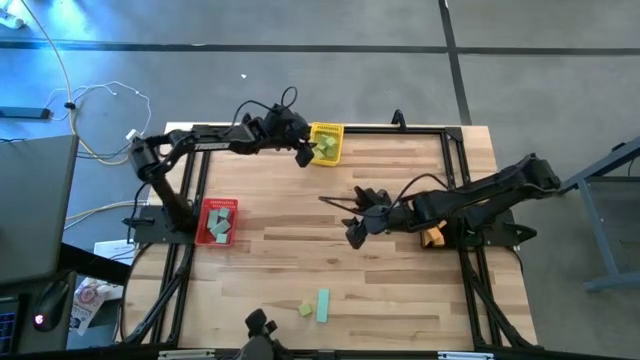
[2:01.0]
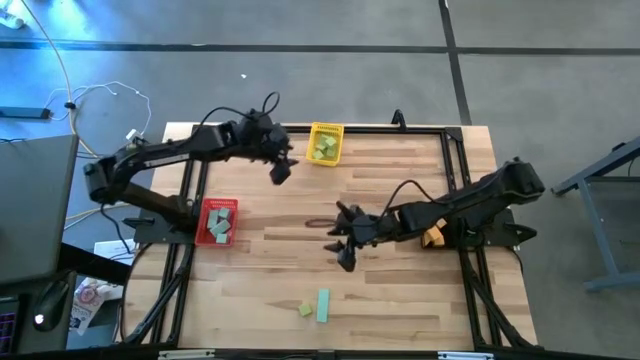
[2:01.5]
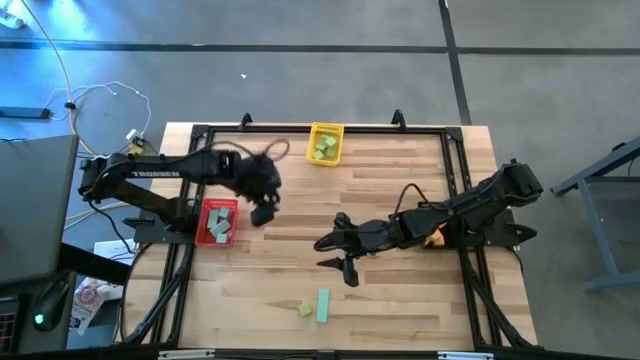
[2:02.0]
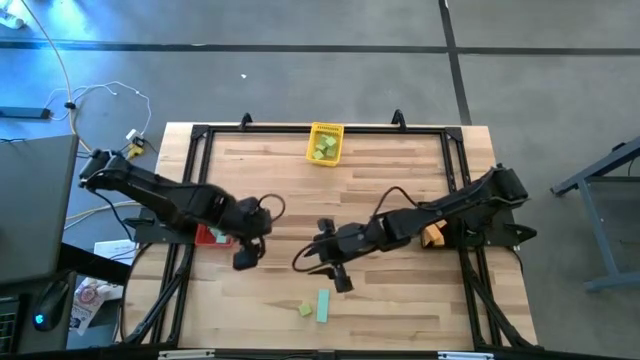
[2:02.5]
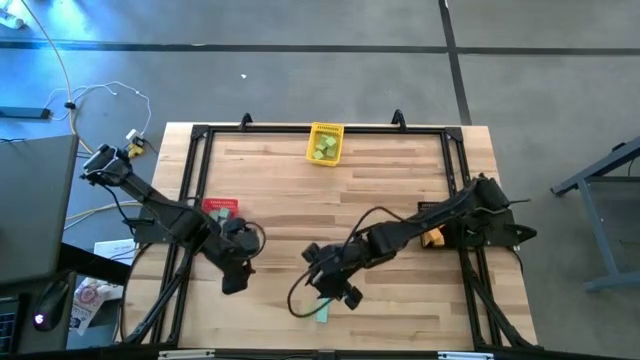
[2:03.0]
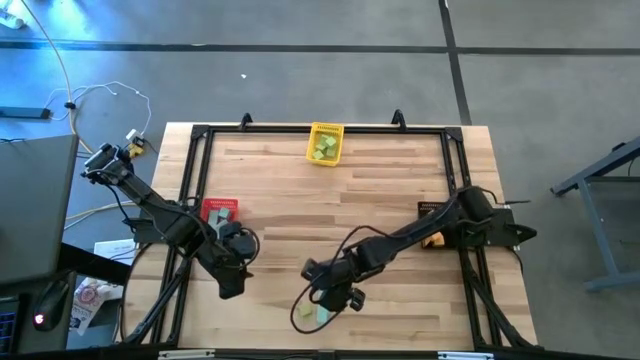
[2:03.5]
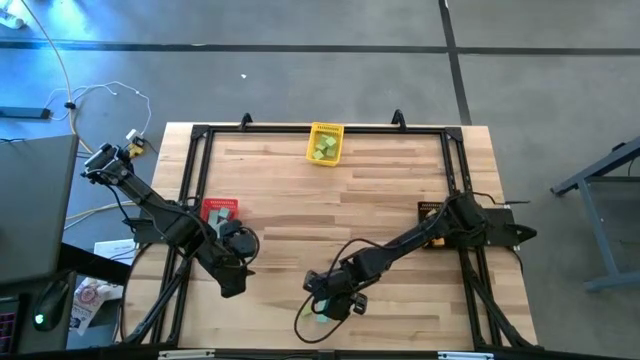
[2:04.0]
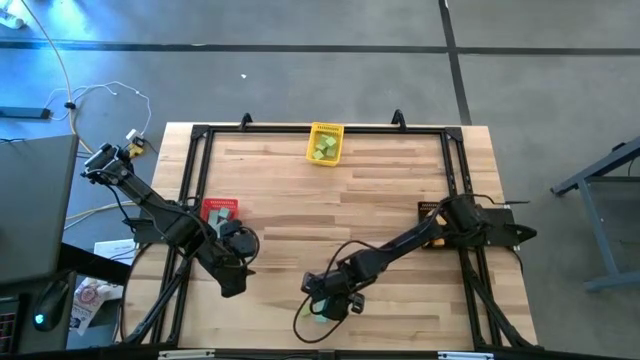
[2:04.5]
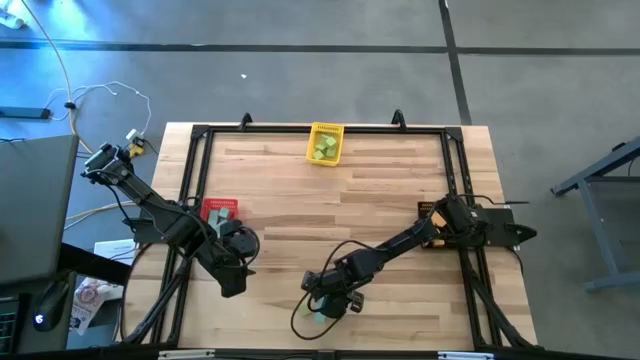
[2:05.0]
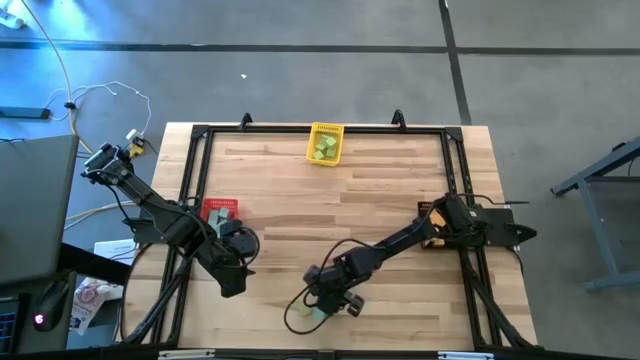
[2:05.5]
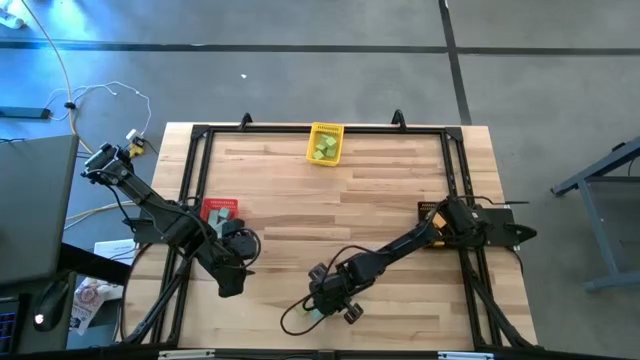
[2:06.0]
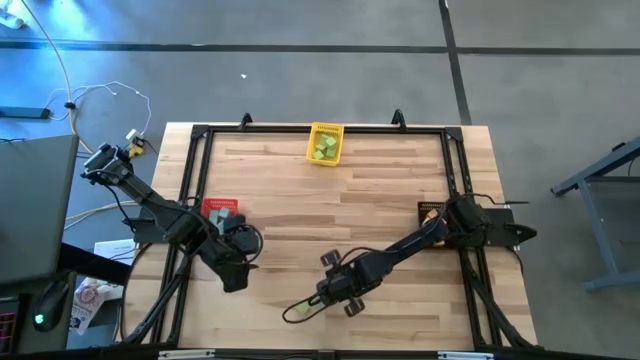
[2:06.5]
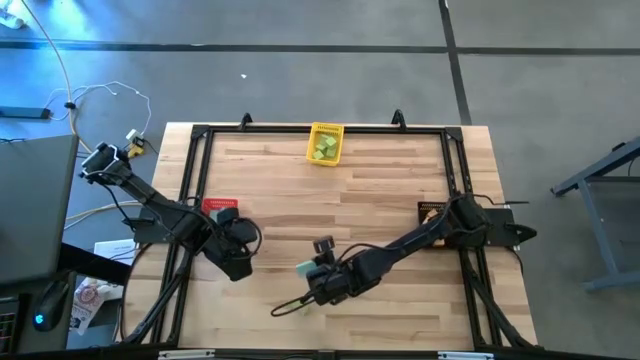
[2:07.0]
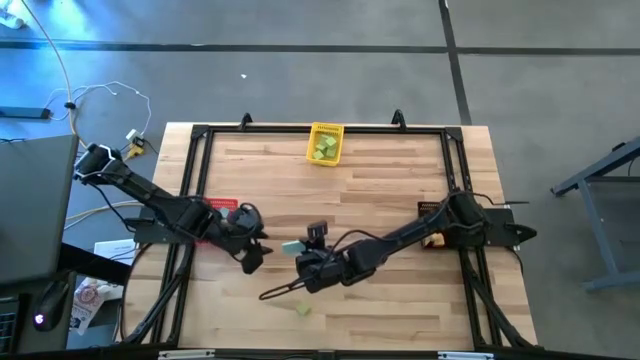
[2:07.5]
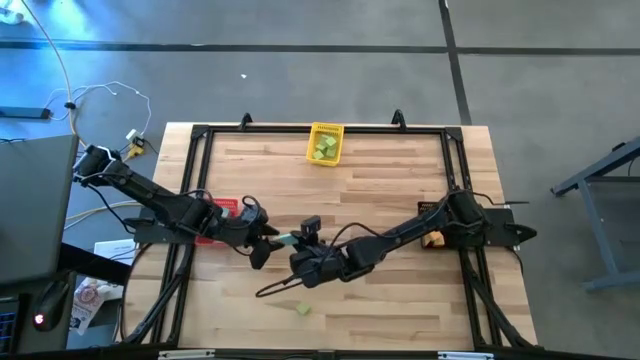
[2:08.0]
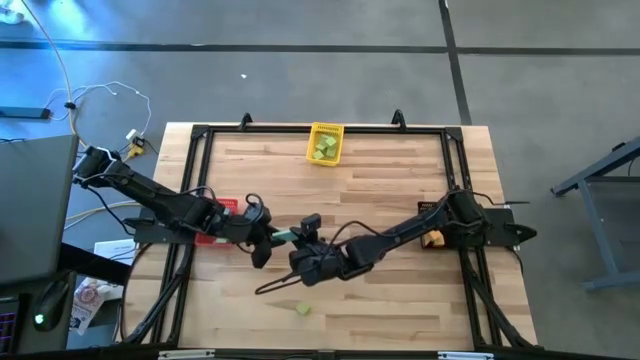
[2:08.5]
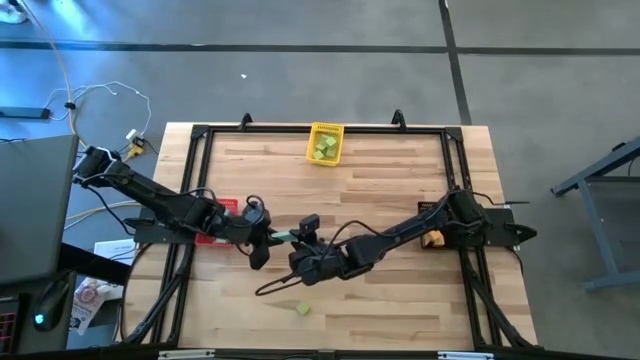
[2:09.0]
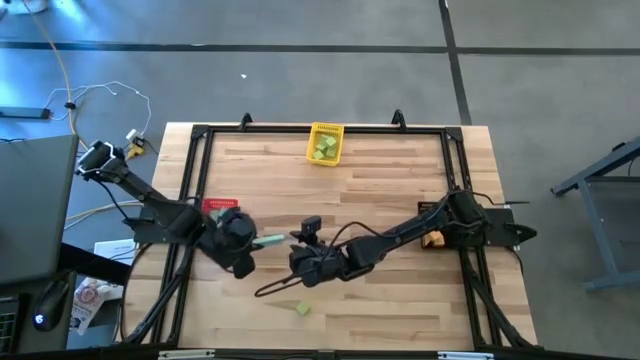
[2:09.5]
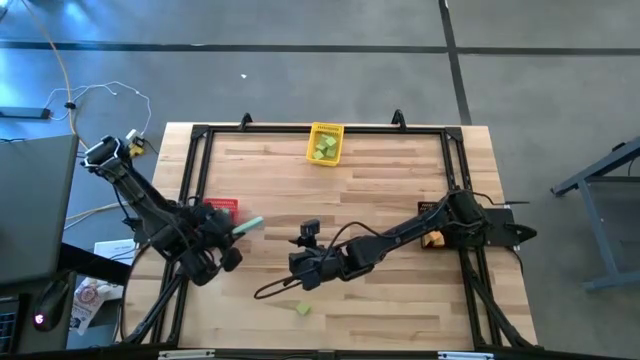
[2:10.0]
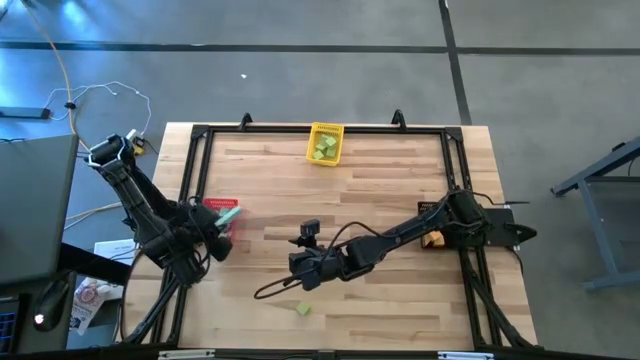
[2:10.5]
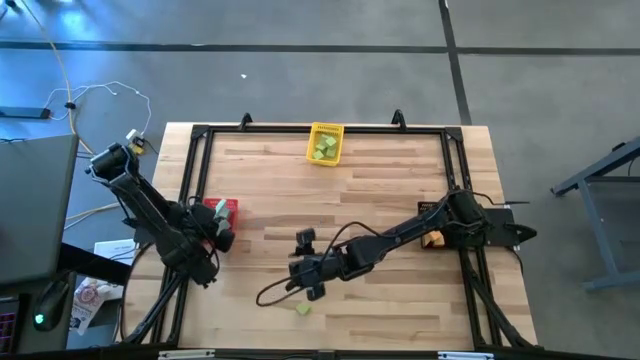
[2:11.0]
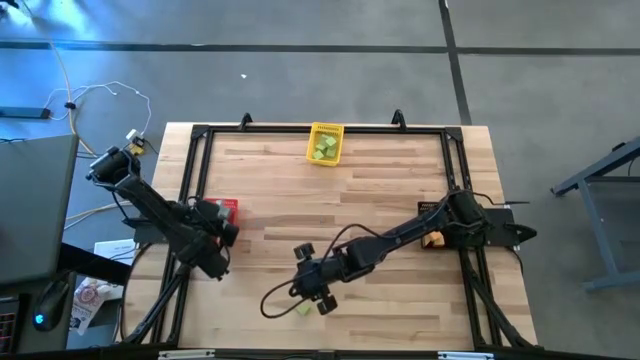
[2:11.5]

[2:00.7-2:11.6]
Task: Sort & place blocks by color
Put the blue block into the red bin

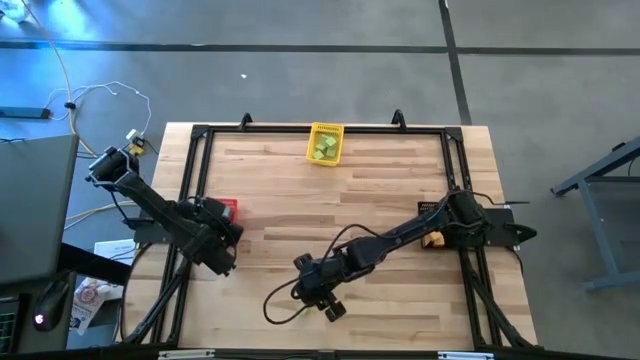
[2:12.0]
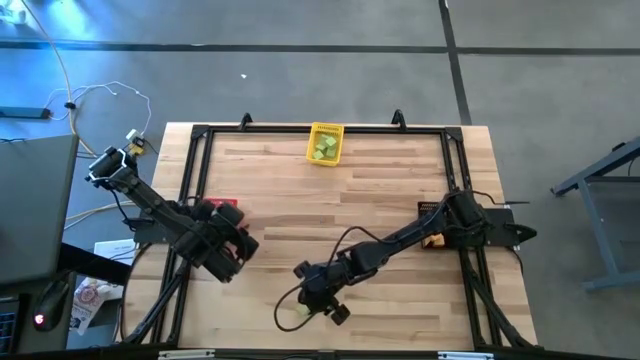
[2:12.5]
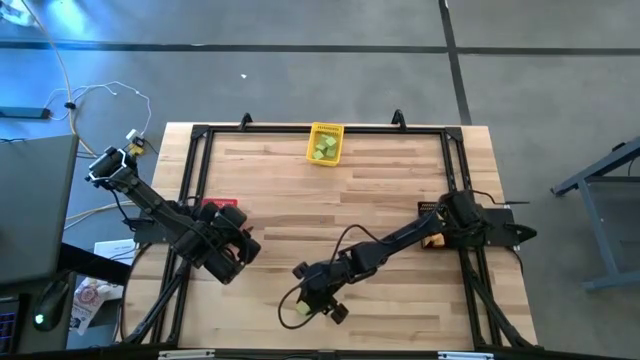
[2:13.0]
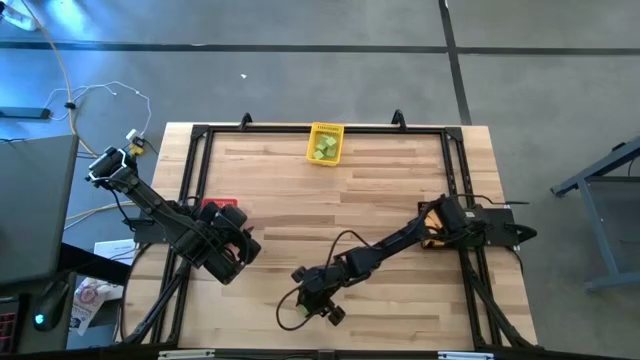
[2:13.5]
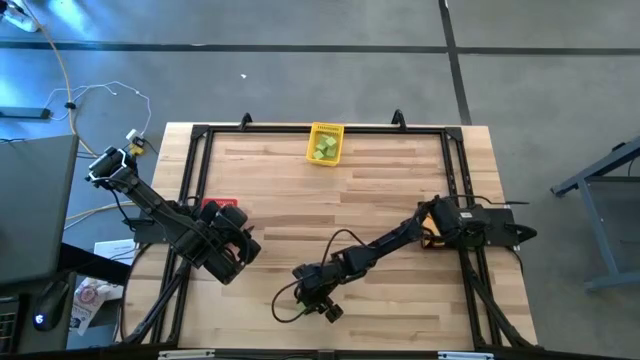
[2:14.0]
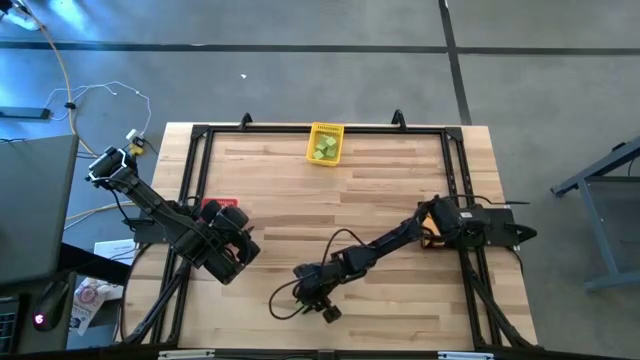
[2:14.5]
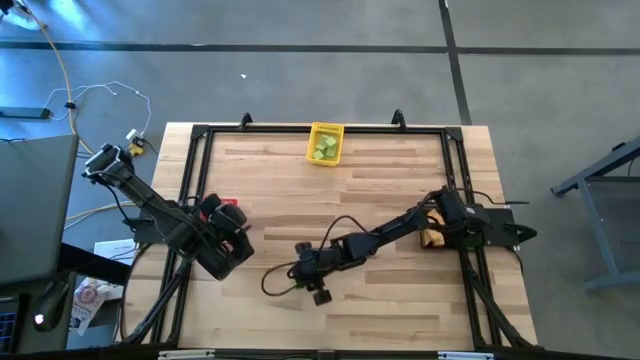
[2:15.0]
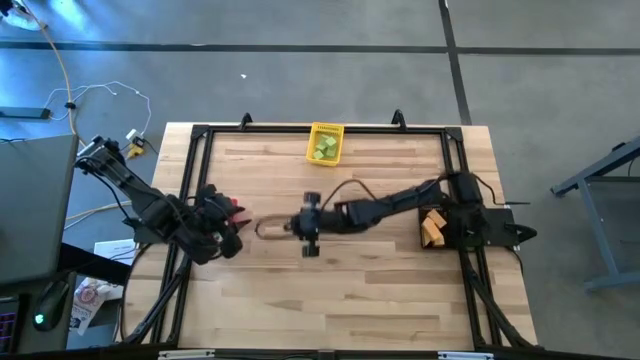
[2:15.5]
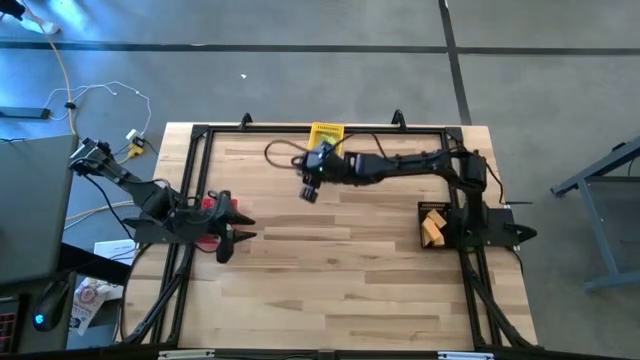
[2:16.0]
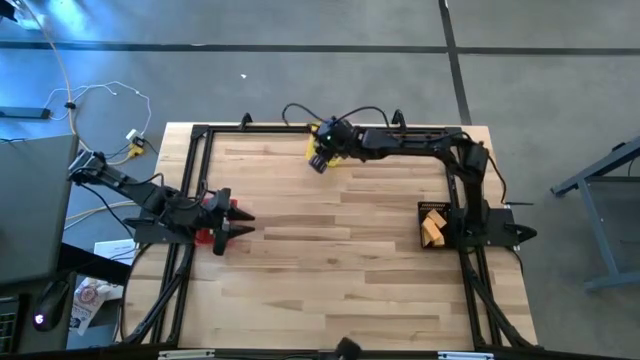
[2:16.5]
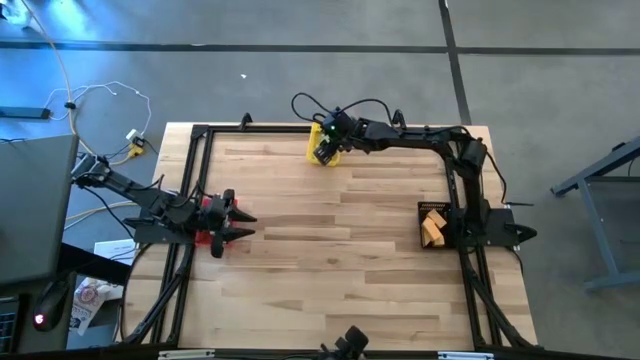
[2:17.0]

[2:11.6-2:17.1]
Put the green block into the yellow bin

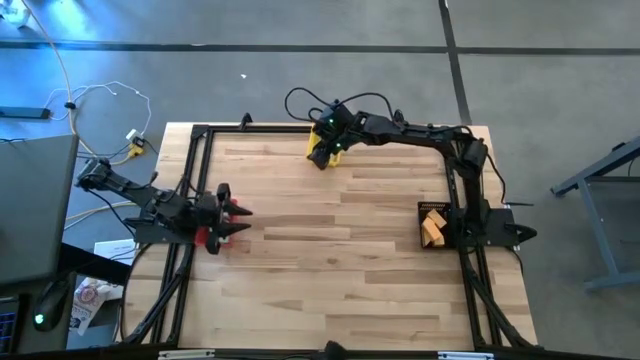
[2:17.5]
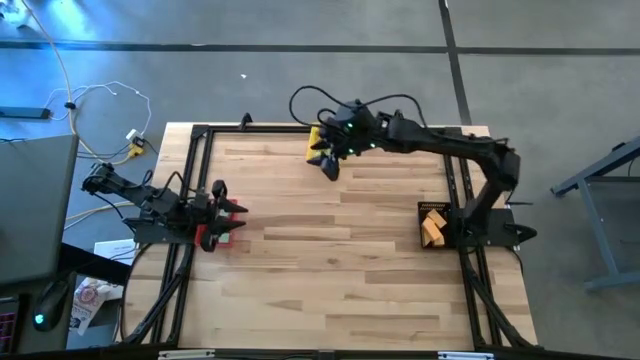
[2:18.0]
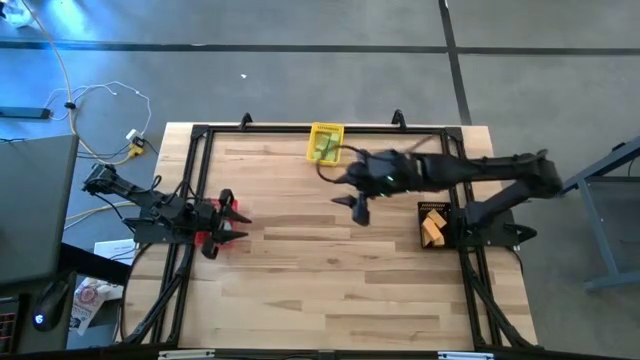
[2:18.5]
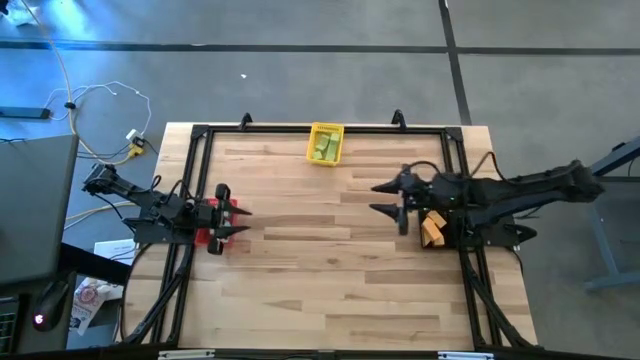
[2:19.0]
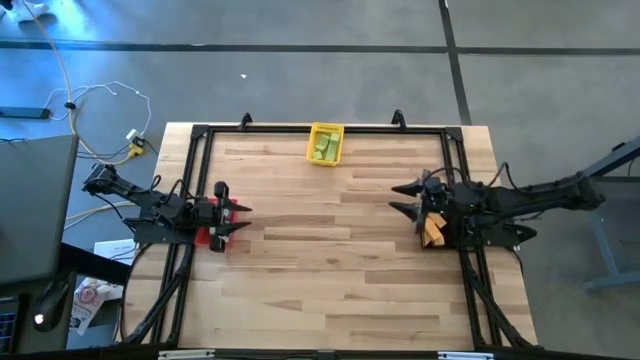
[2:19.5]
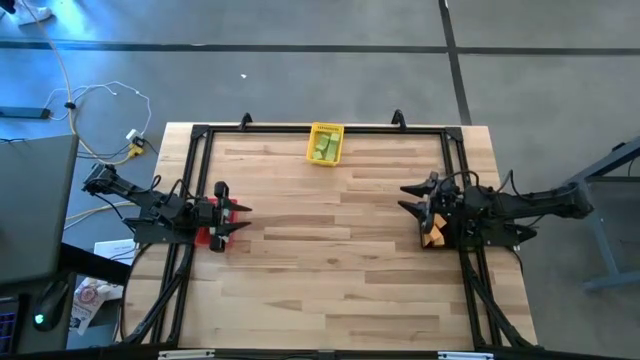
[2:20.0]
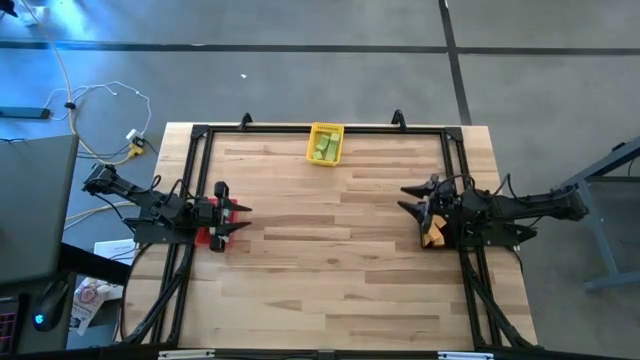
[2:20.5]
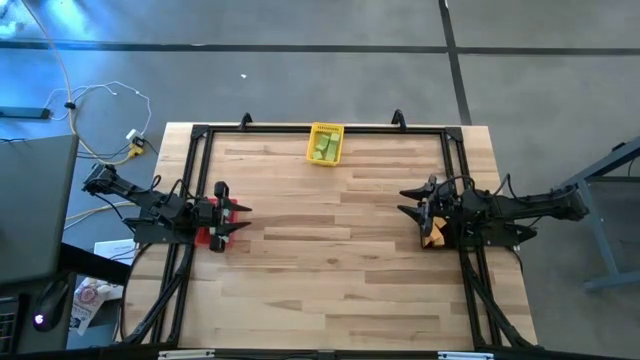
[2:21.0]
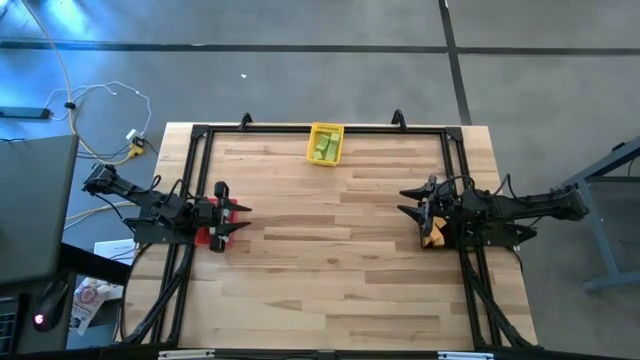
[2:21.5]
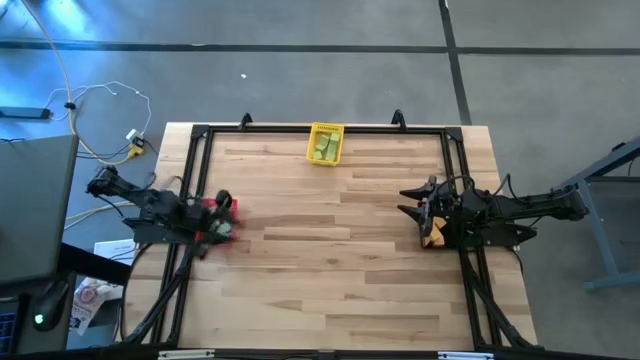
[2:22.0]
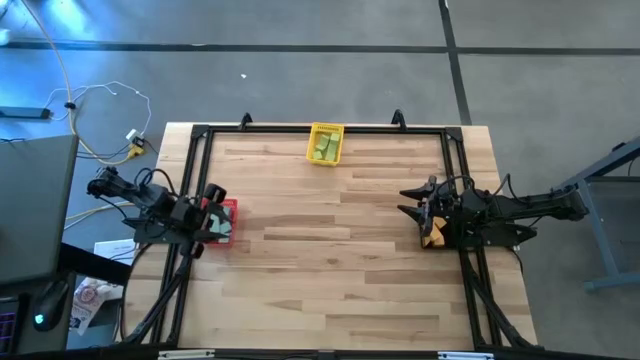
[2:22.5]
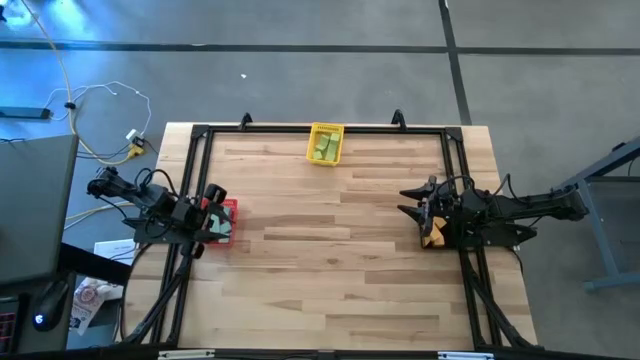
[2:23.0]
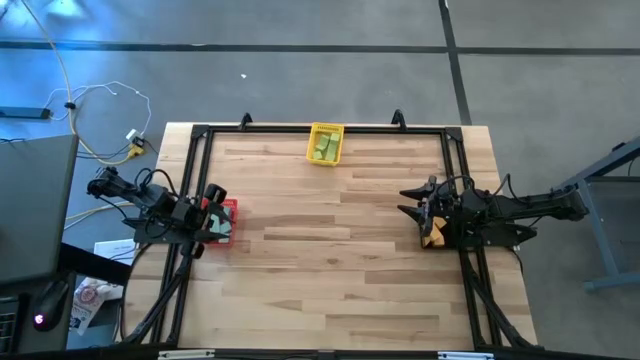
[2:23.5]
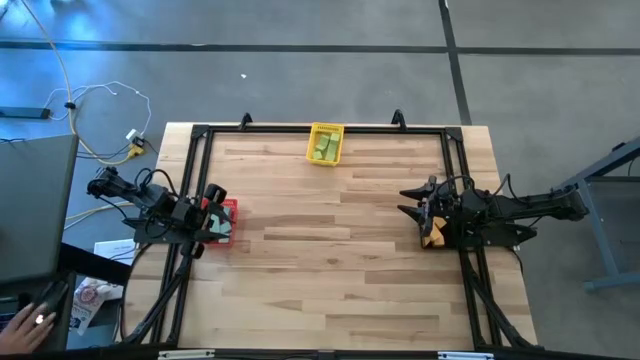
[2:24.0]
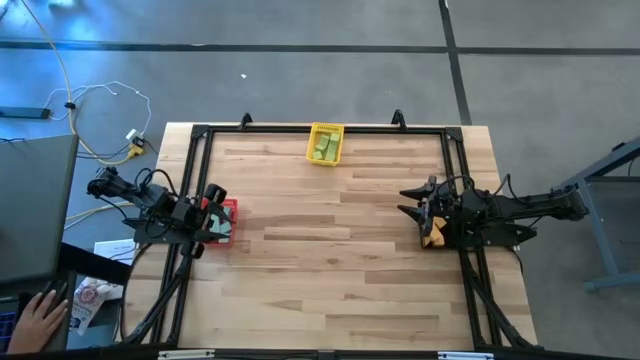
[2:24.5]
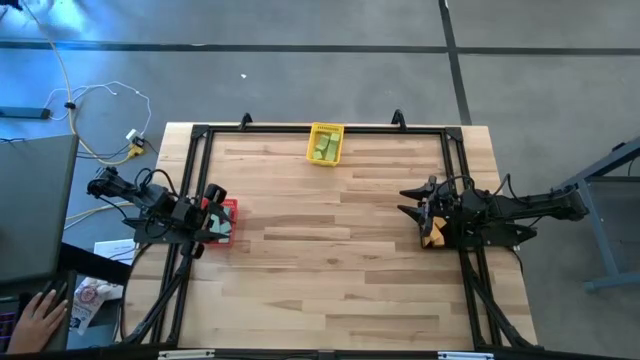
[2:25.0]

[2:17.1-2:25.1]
Return to Home Position
